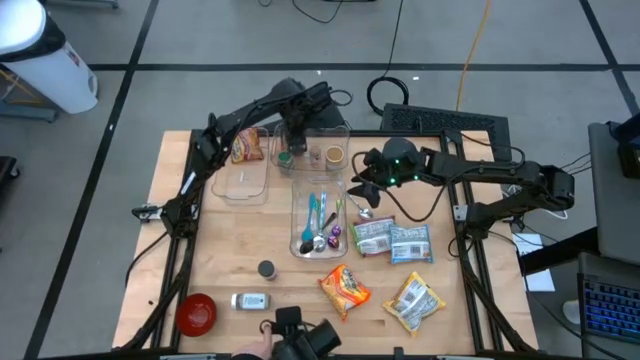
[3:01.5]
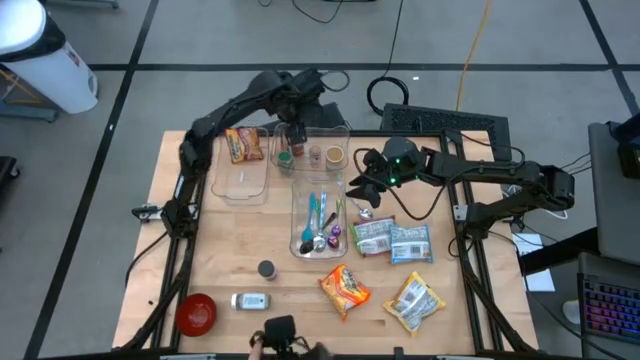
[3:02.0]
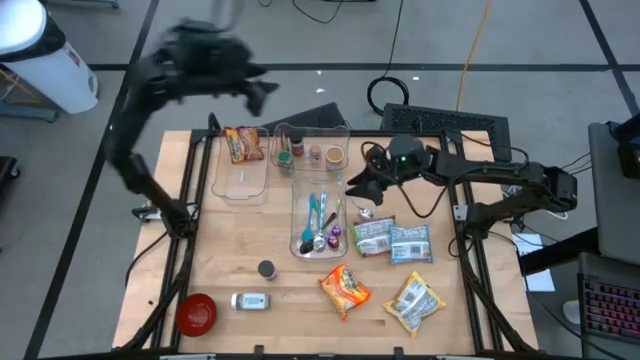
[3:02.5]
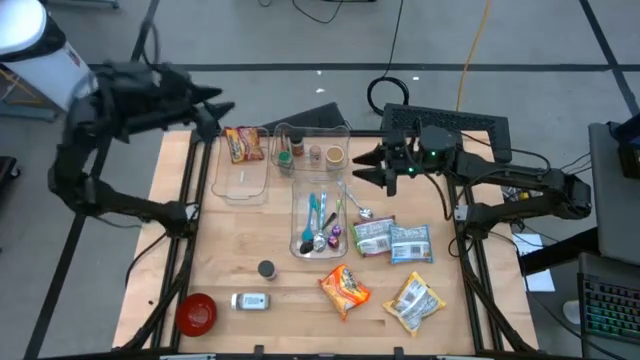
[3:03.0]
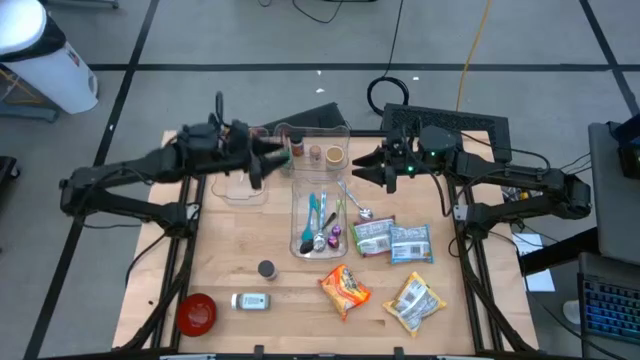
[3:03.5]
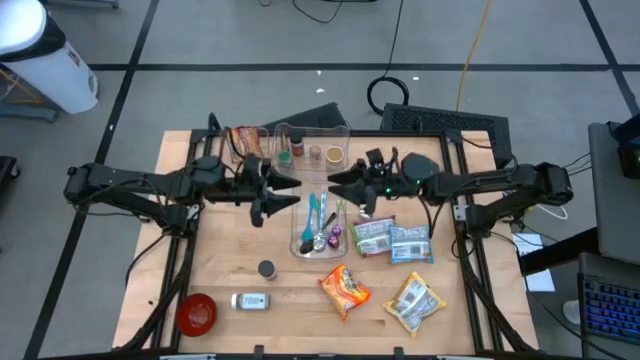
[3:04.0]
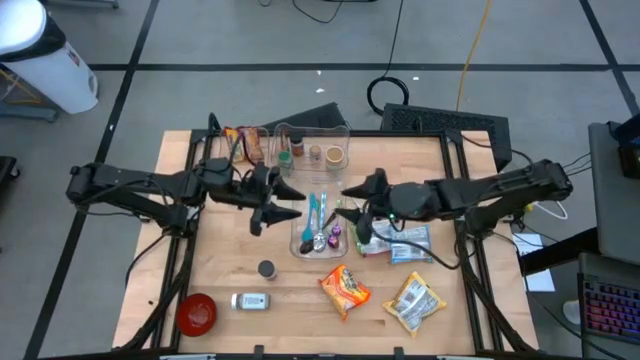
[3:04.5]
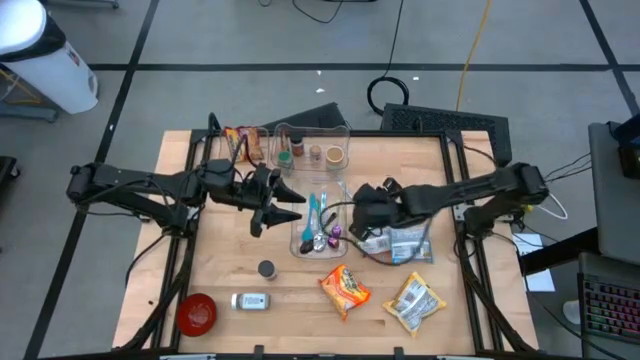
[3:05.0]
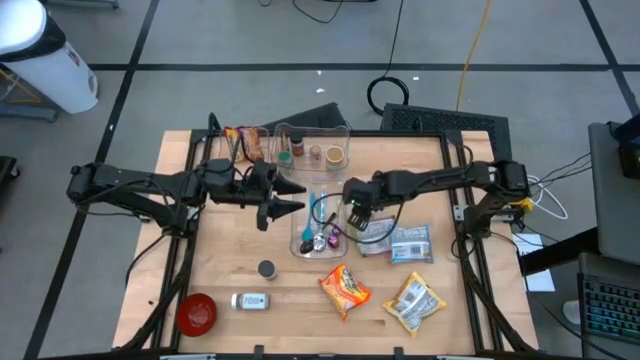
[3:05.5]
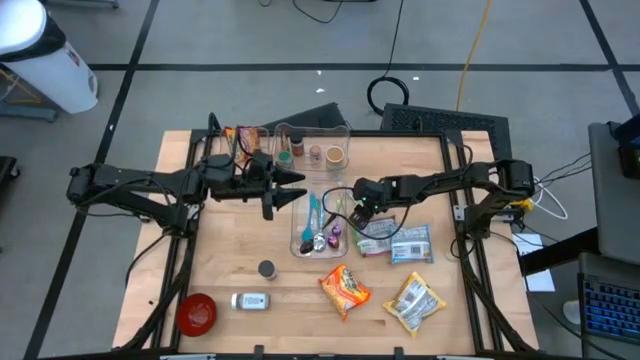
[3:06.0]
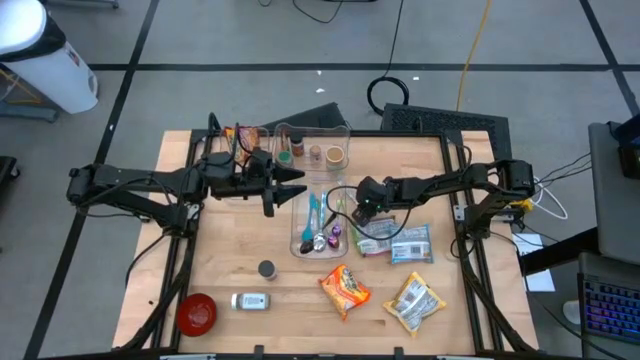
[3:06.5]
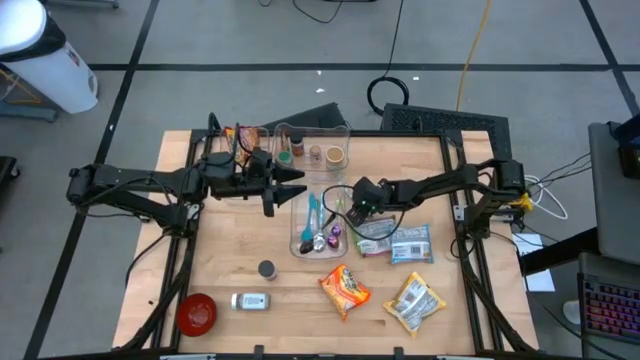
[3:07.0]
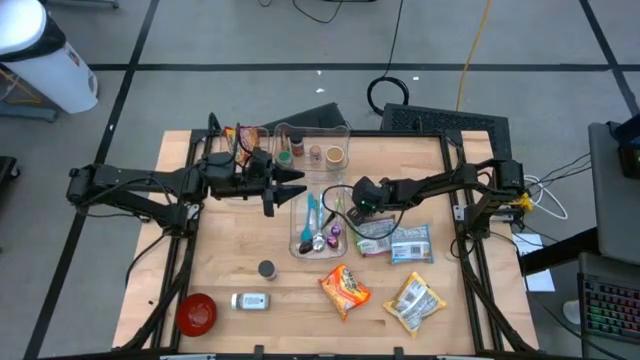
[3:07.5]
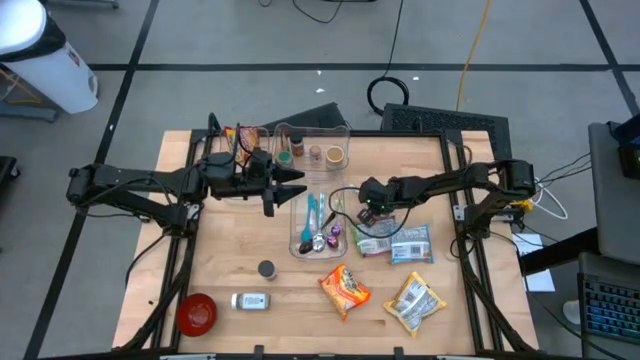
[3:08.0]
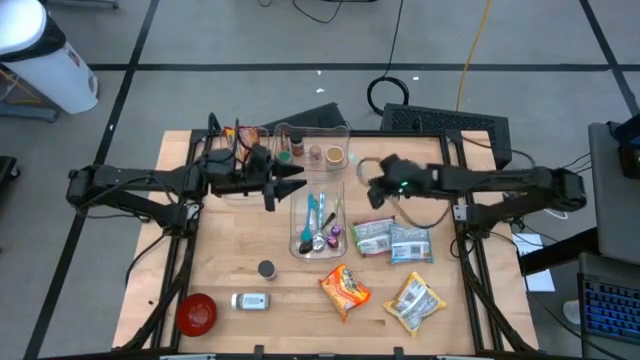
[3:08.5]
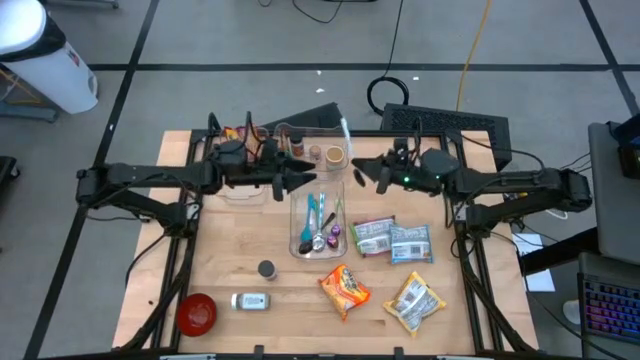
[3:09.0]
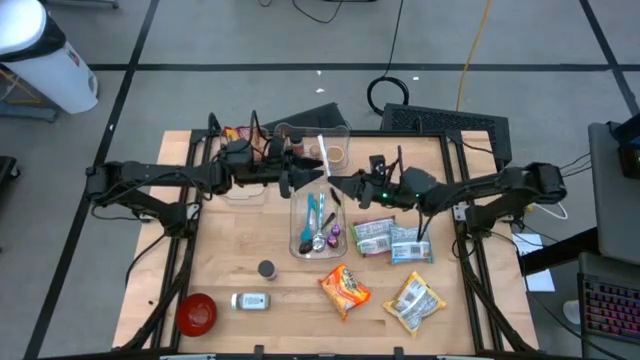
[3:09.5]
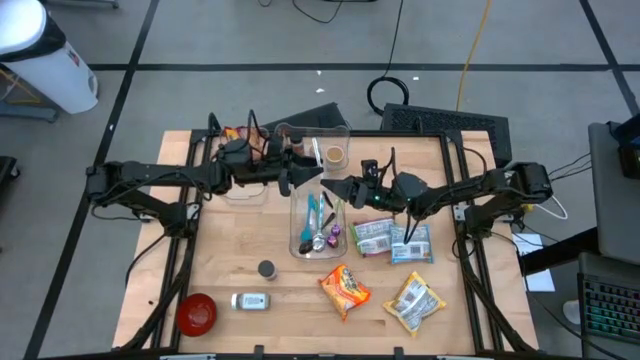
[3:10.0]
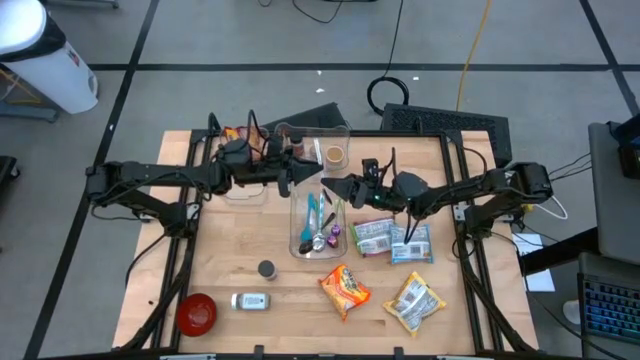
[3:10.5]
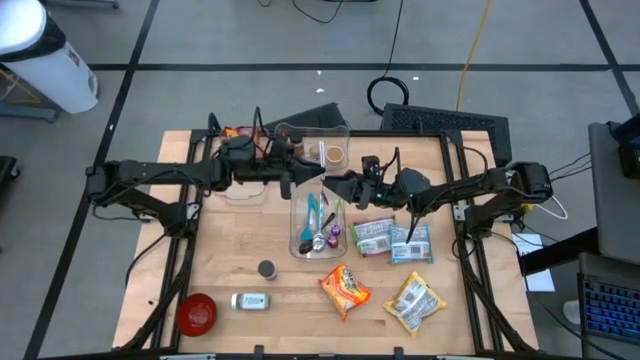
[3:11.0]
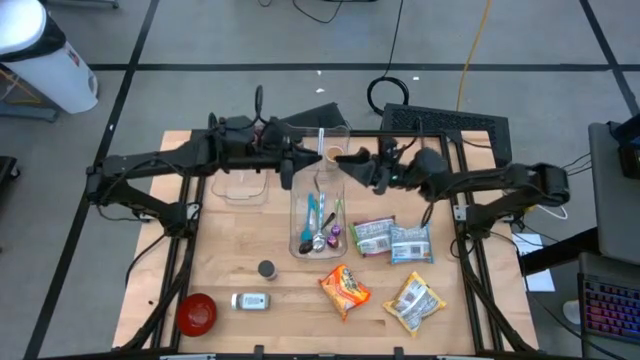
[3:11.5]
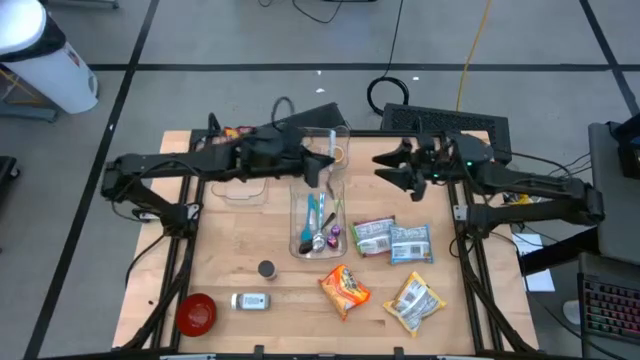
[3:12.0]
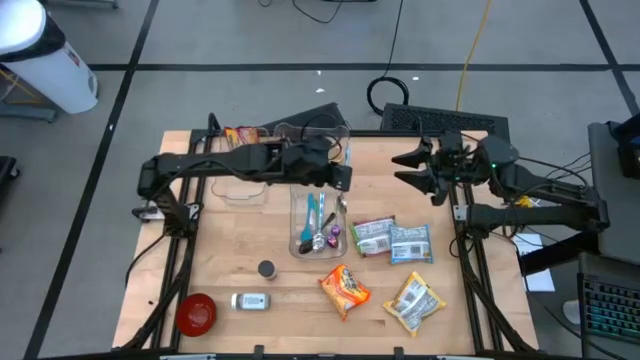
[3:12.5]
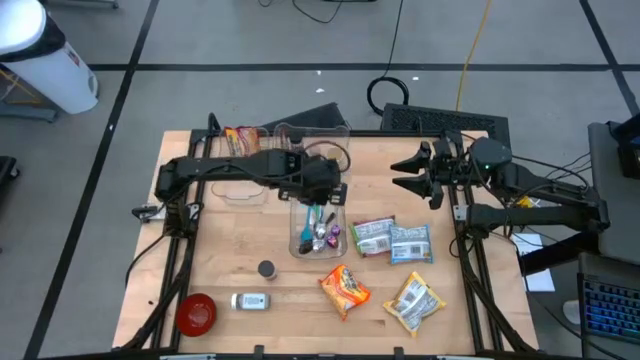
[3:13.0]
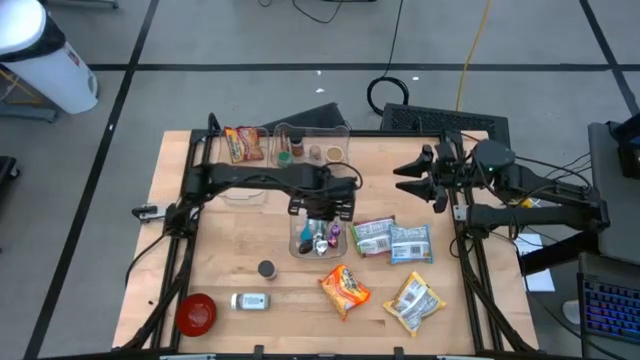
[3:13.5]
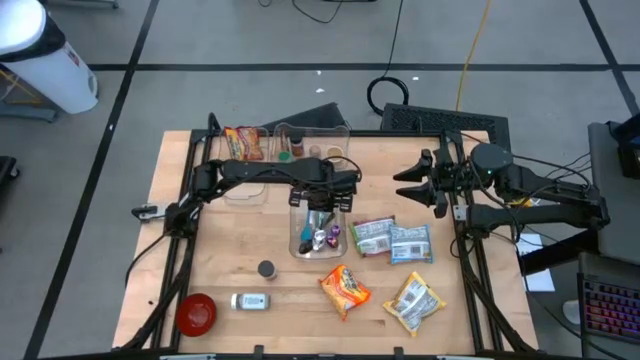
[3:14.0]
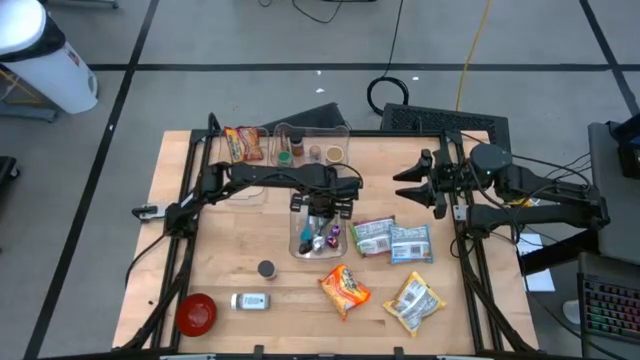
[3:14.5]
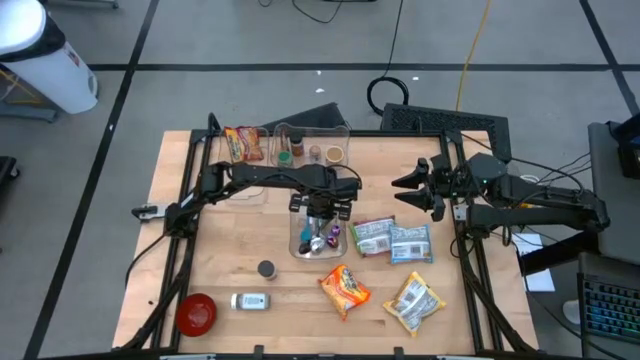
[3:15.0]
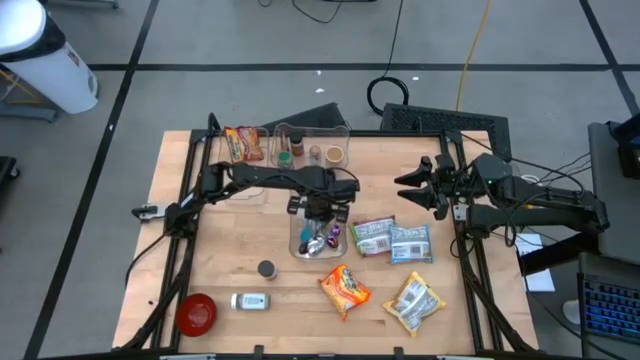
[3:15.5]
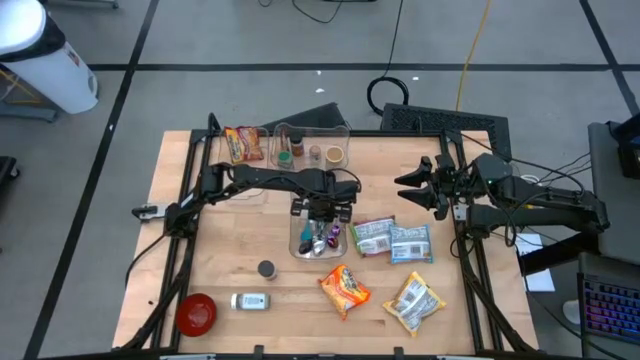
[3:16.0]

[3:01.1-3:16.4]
Task: Pick & Place Food Item
Put the white blue spoon into the bottom right transparent bin

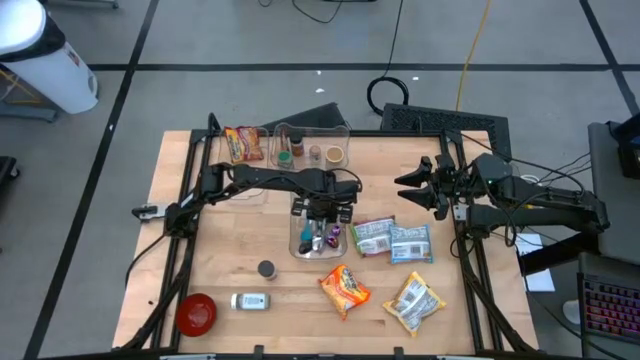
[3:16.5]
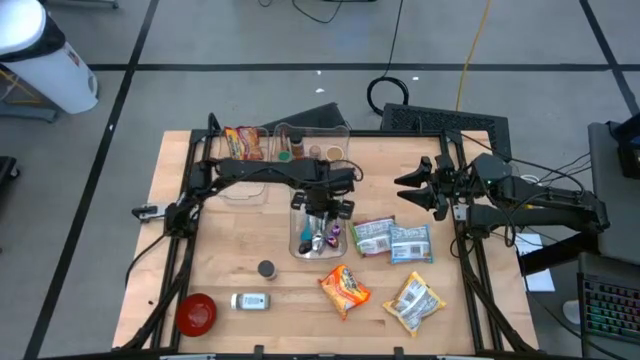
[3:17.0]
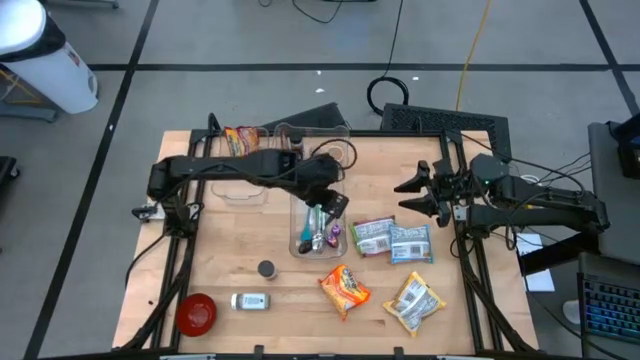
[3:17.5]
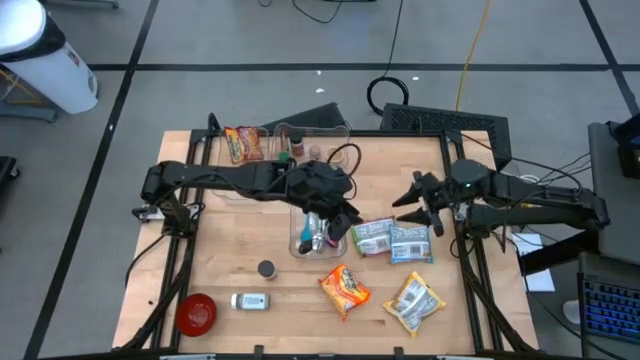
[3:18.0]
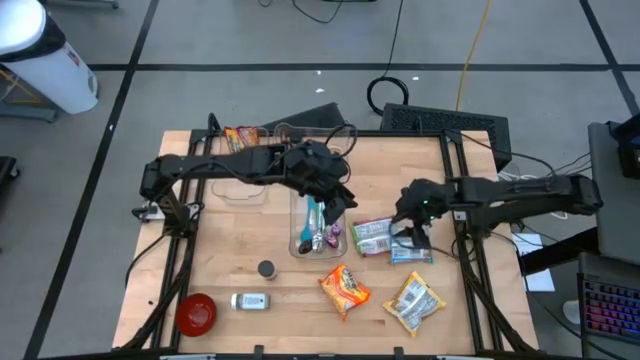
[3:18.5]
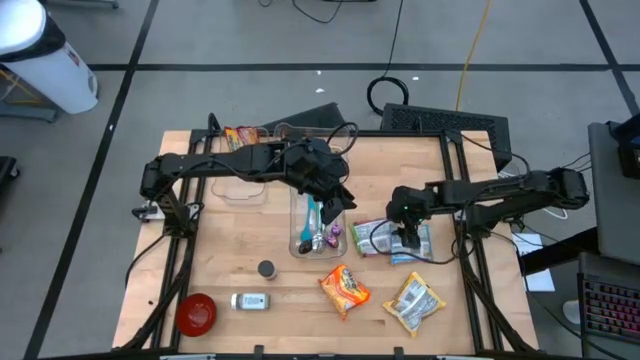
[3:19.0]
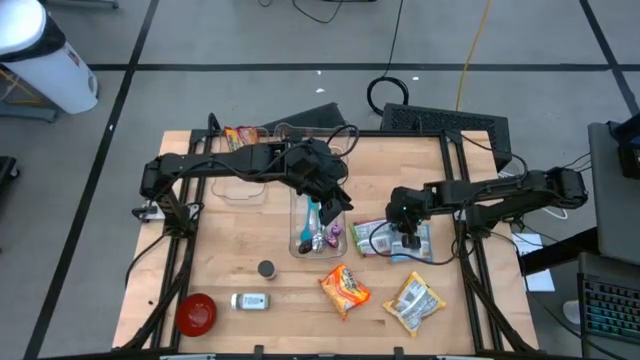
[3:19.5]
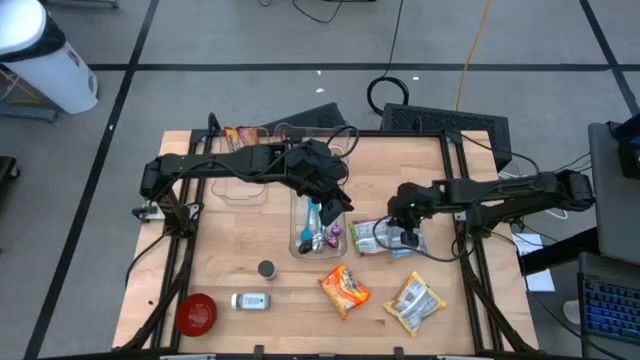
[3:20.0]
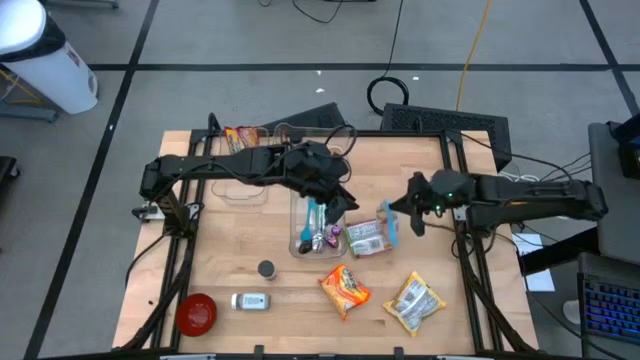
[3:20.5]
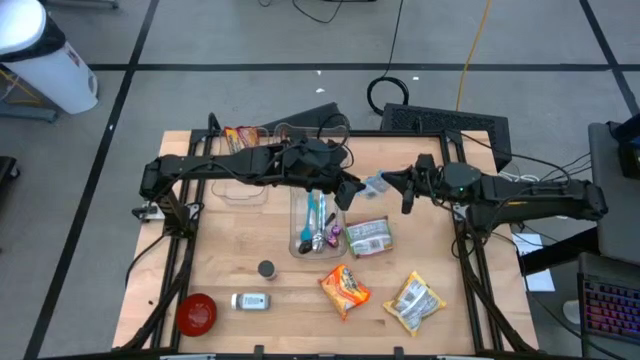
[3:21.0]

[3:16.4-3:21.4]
Put the blue noodle pack into the top left transparent bin
